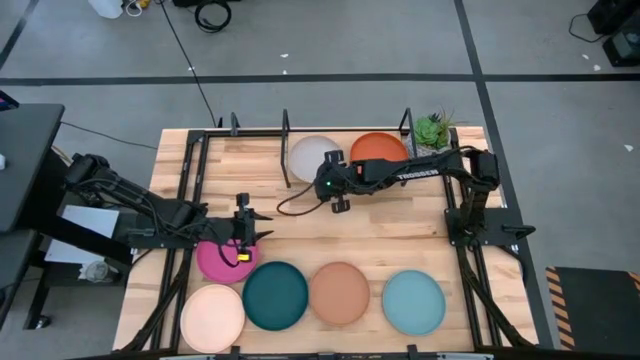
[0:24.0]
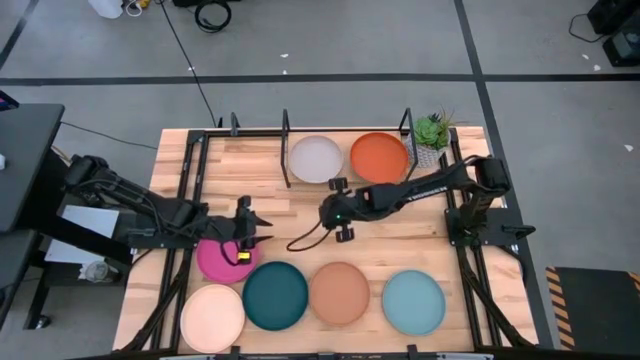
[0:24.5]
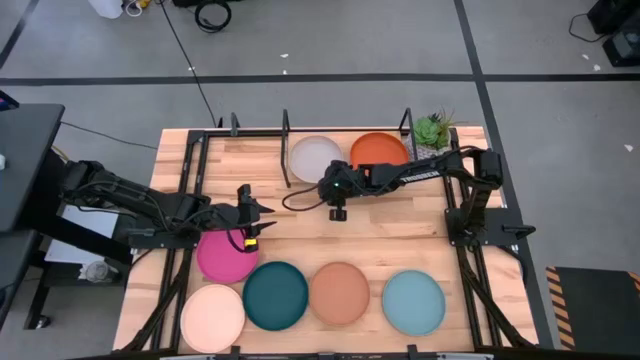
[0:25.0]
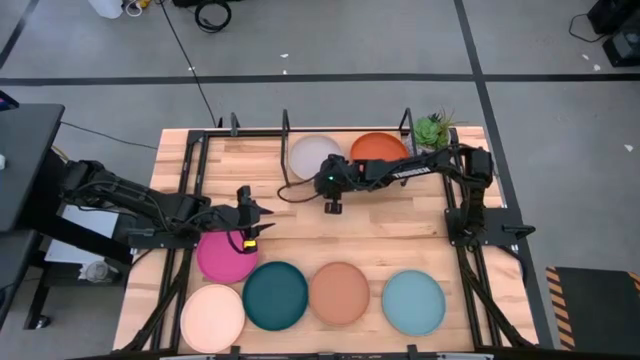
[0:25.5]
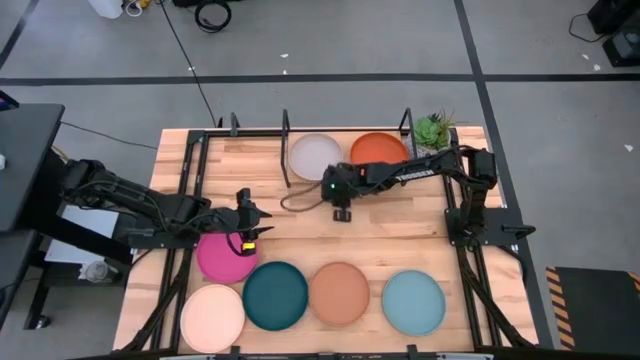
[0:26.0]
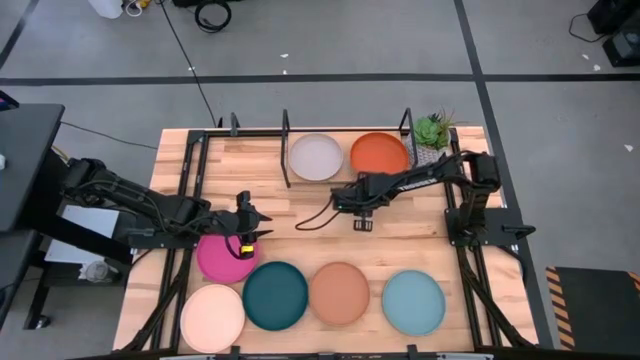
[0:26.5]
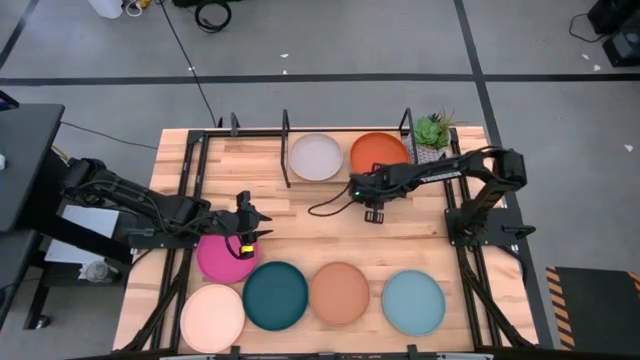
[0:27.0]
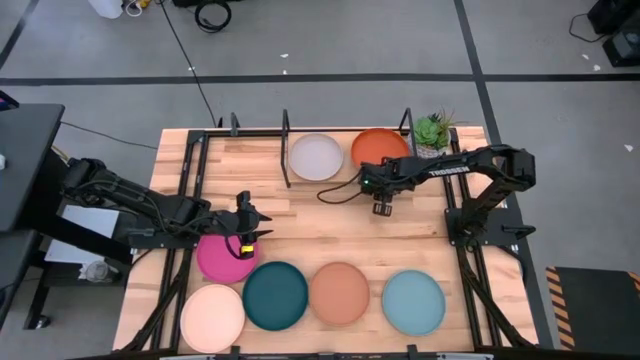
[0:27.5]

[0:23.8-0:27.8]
Task: Place and stack plates onto a shelf
Adjust the plates on the shelf

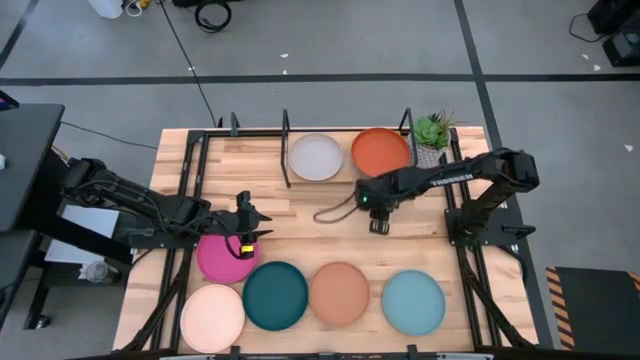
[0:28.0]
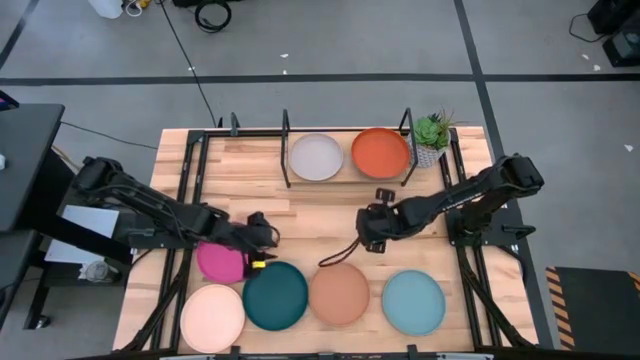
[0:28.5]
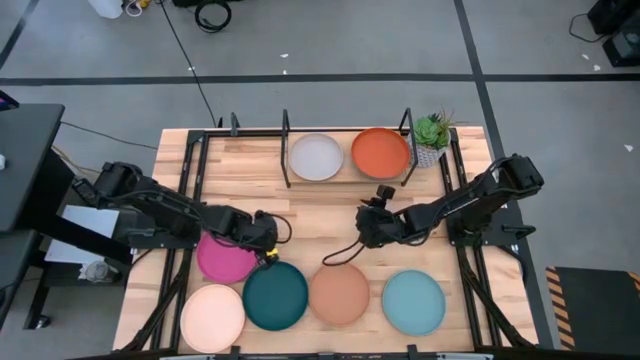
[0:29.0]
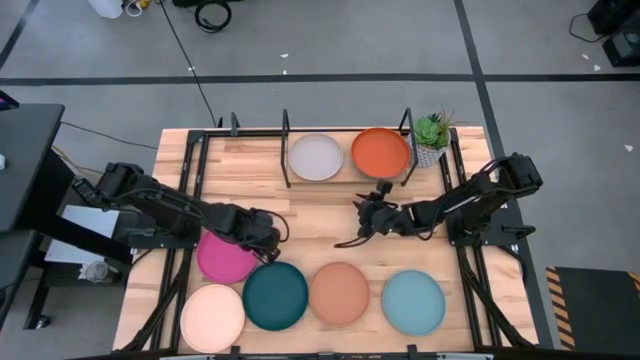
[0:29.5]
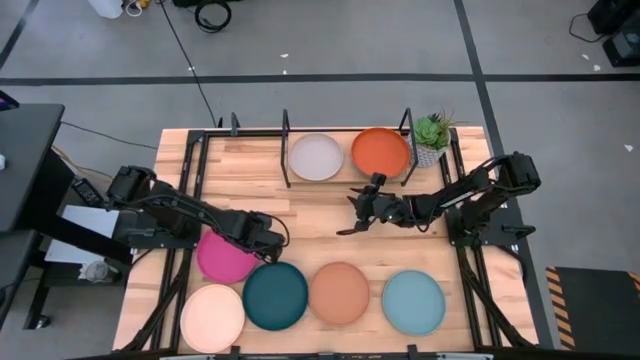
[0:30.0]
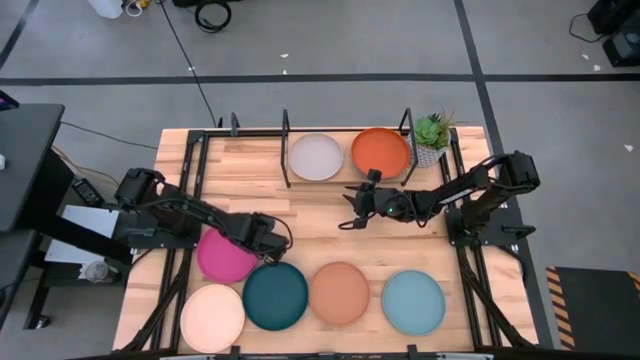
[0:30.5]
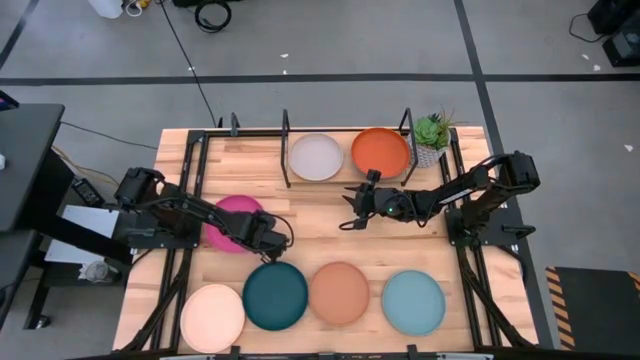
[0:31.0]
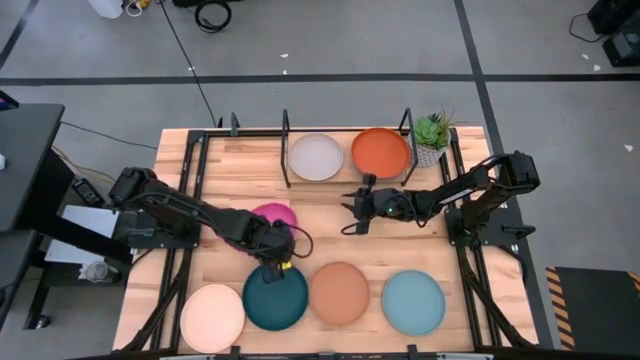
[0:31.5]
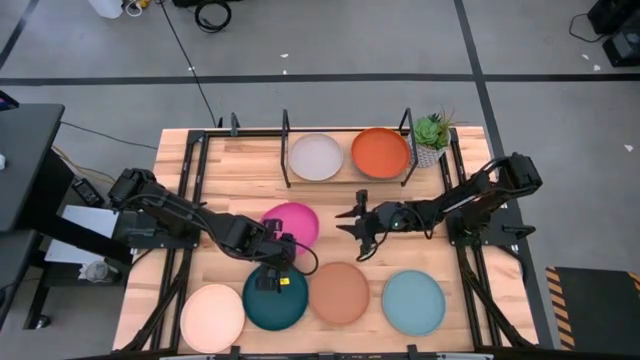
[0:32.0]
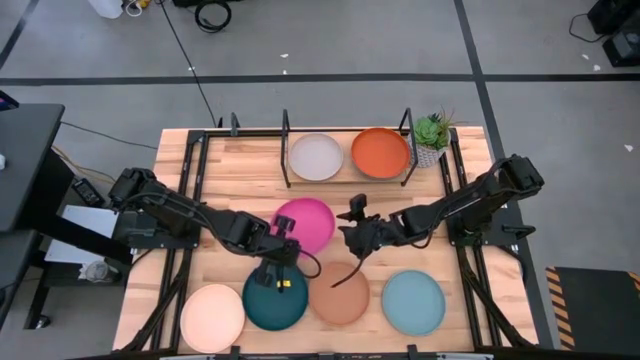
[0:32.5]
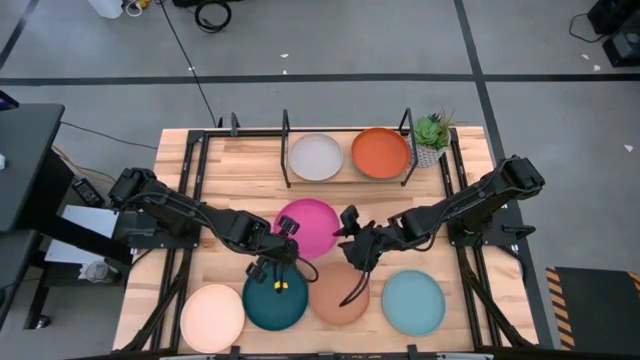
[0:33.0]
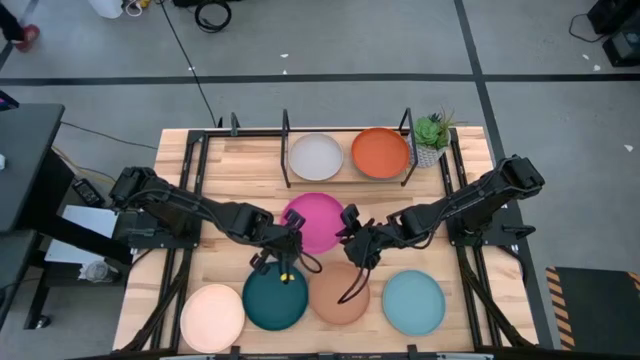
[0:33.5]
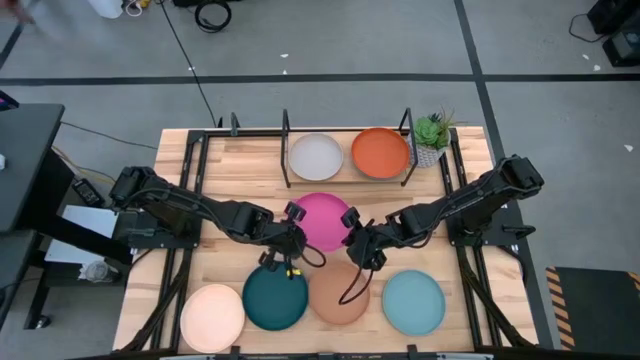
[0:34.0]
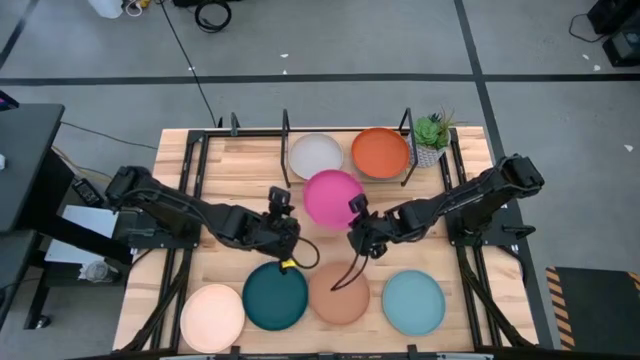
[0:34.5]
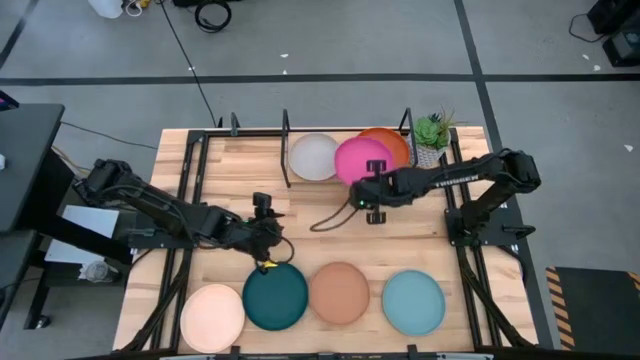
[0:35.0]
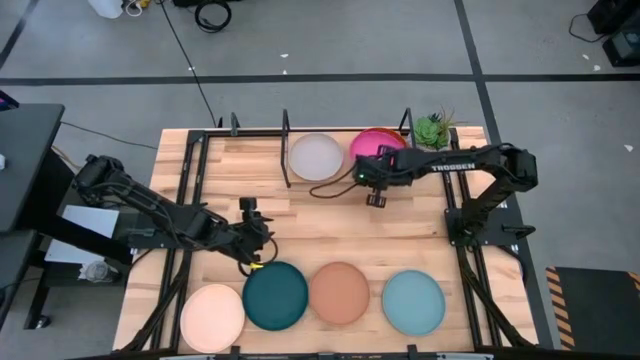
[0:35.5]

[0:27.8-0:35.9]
Stack the pink plate on top of the orange plate on the shelf

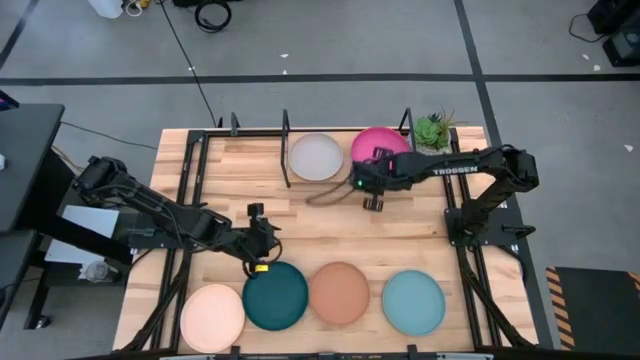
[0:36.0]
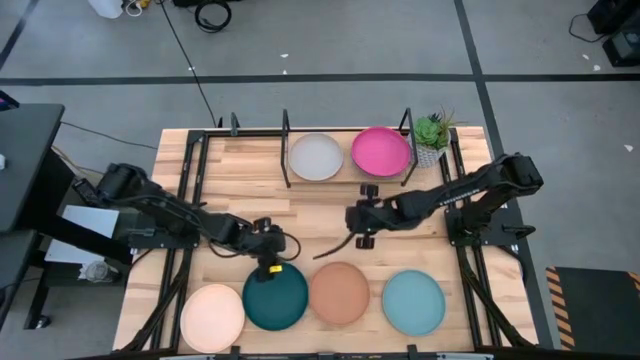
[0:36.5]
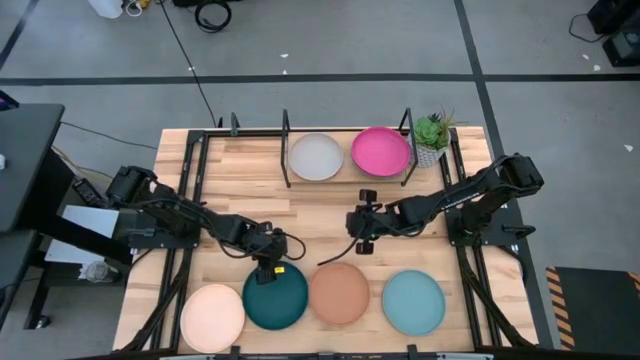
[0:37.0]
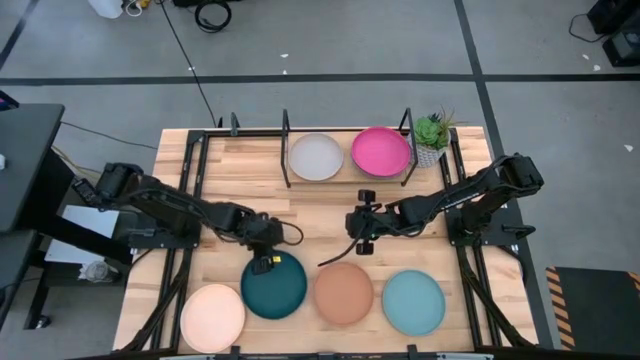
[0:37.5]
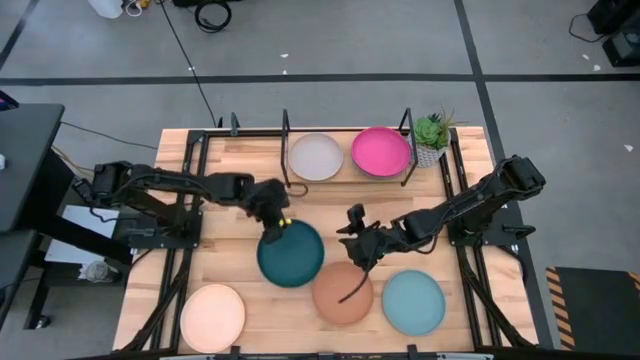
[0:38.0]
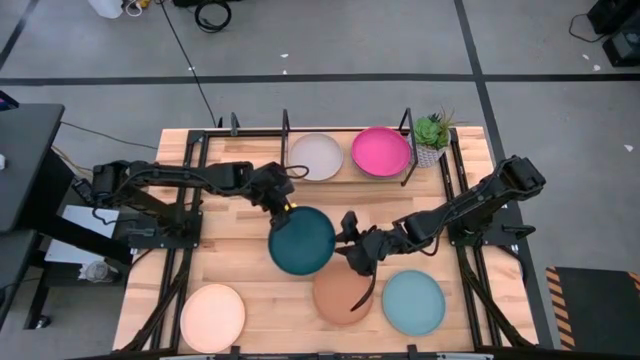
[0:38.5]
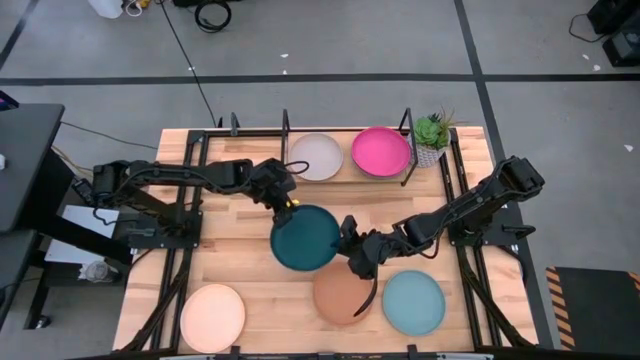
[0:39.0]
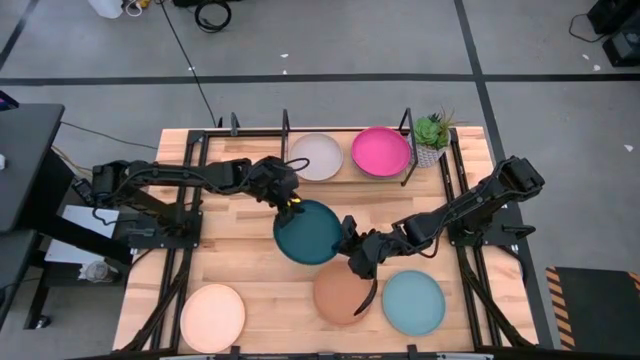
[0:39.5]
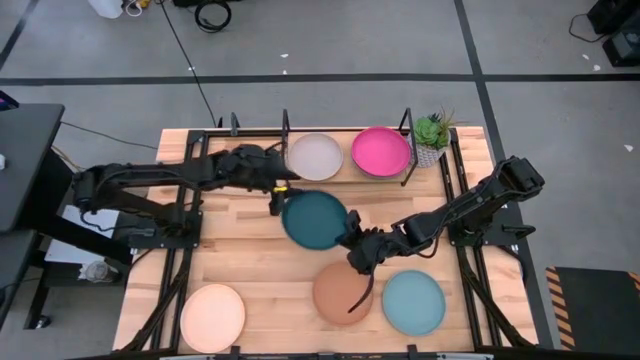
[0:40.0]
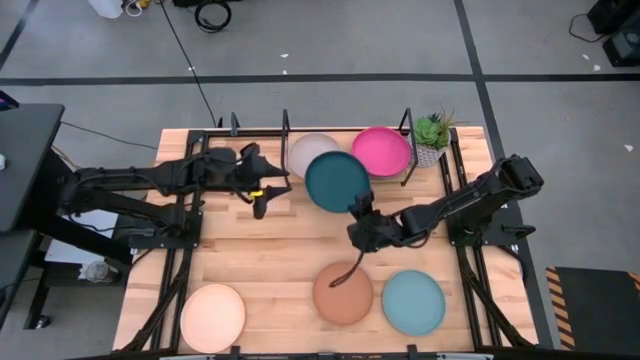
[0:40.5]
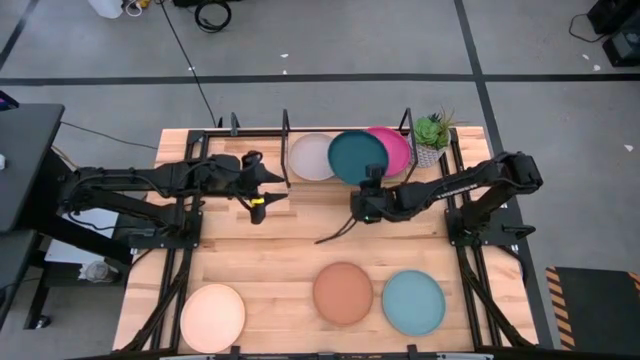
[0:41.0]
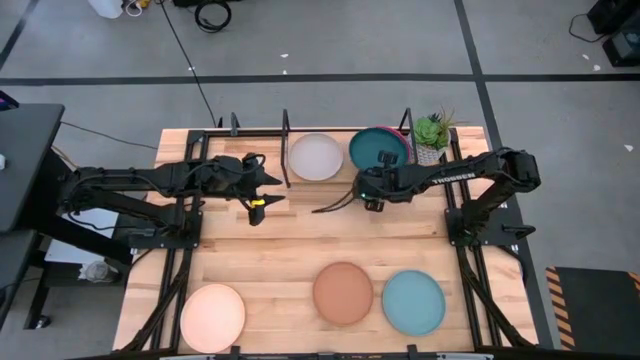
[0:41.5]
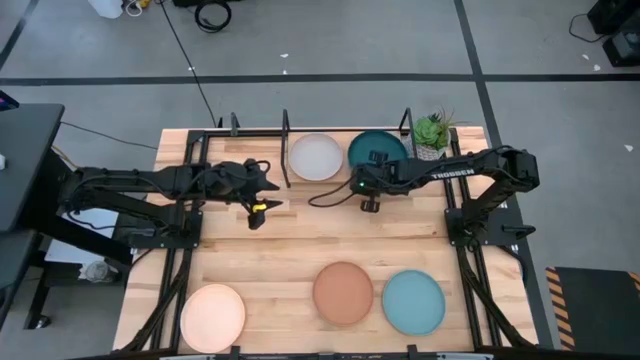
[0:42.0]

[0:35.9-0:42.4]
Stack the green plate on top of the pink plate on the shelf

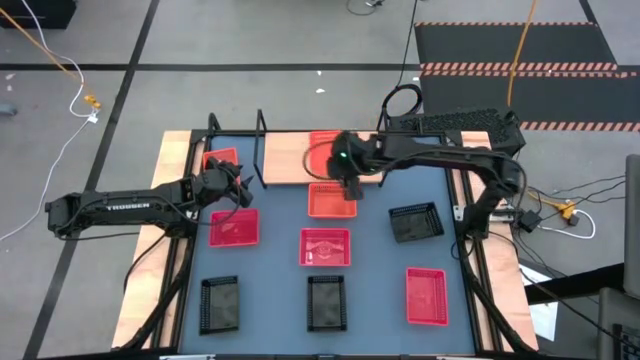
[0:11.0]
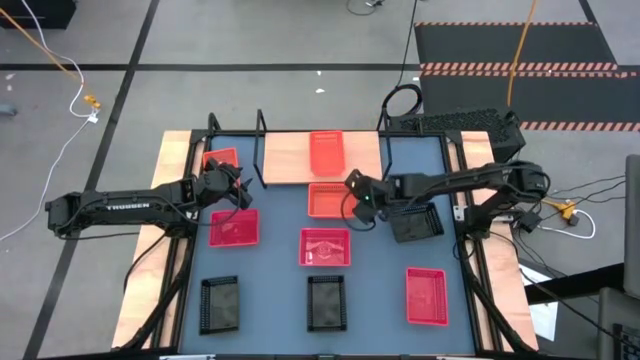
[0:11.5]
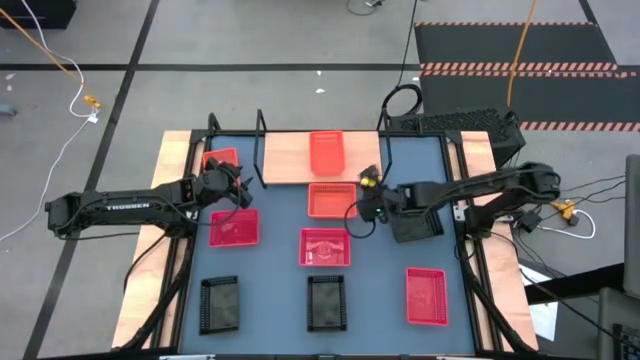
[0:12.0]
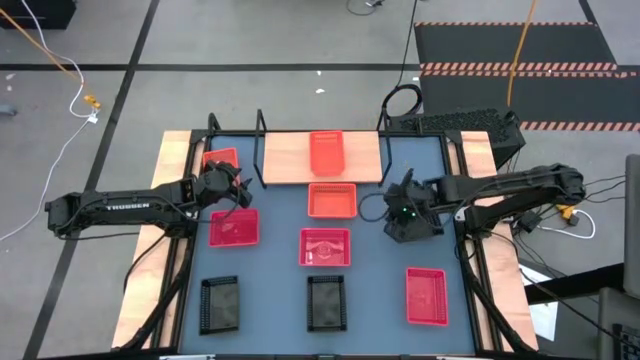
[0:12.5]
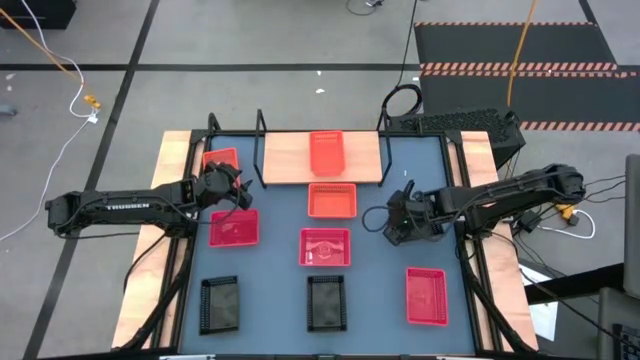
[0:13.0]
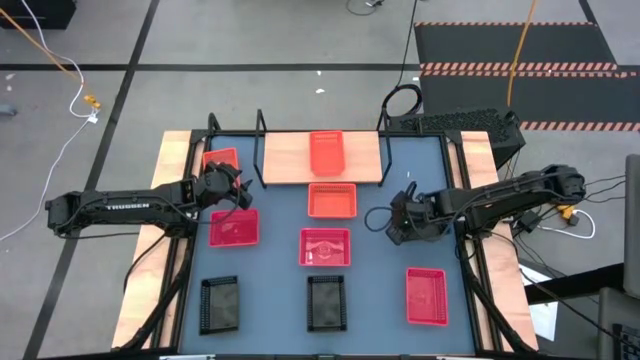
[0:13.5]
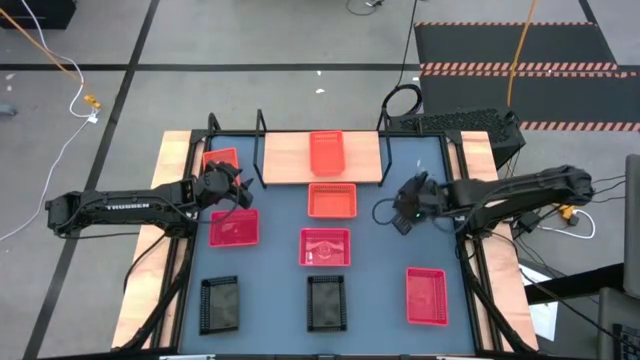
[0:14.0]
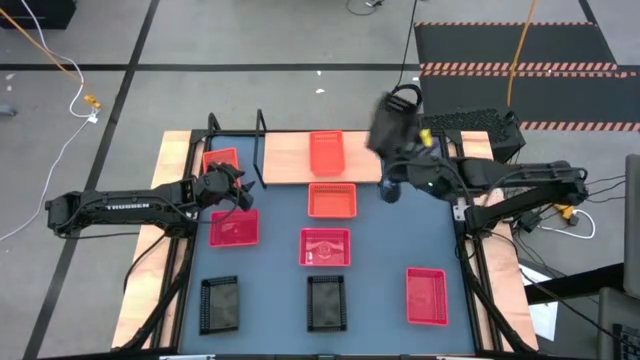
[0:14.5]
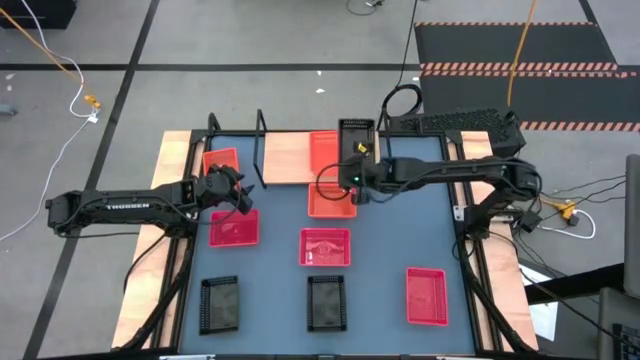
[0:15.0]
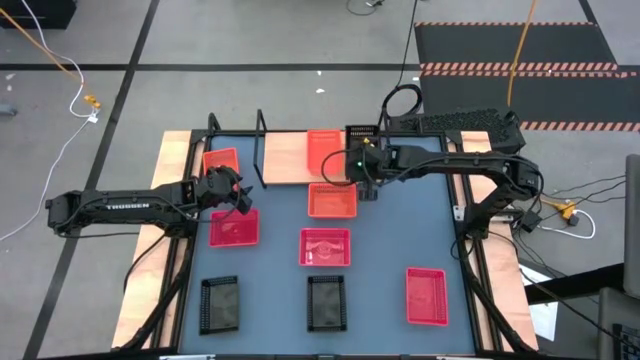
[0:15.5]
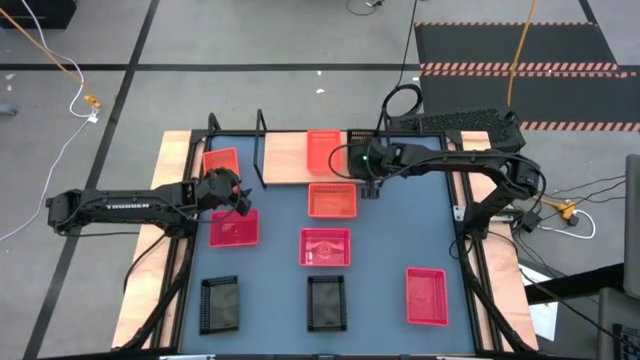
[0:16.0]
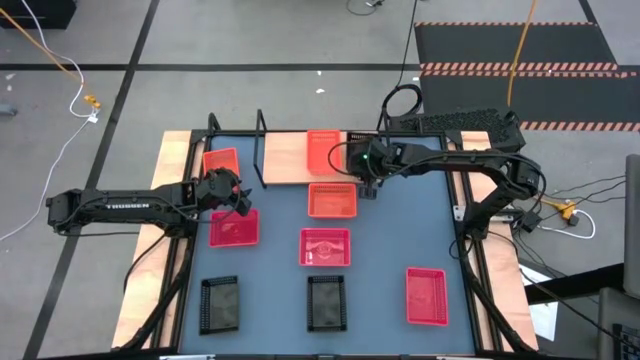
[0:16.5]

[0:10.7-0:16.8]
Task: Stack baskets on shelf by color
Put the right black basket on the shelf
